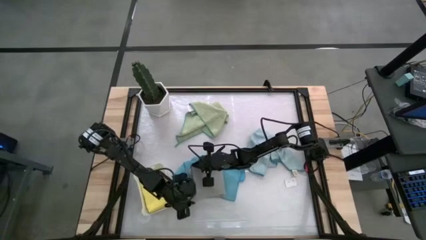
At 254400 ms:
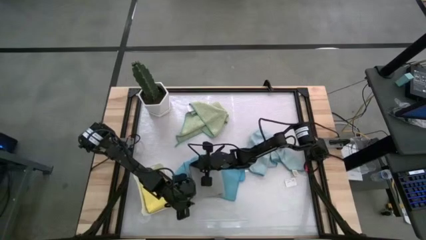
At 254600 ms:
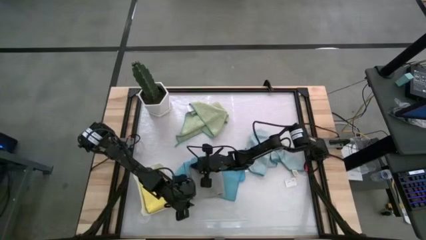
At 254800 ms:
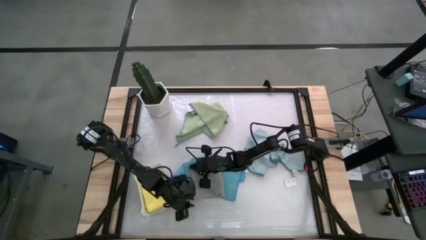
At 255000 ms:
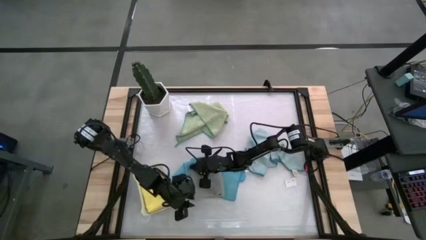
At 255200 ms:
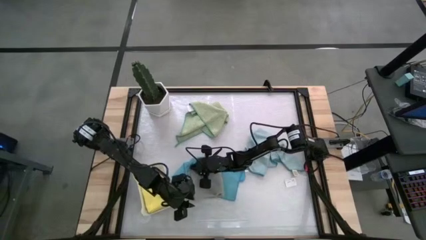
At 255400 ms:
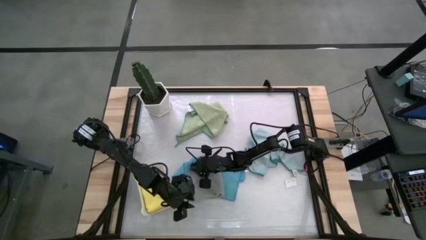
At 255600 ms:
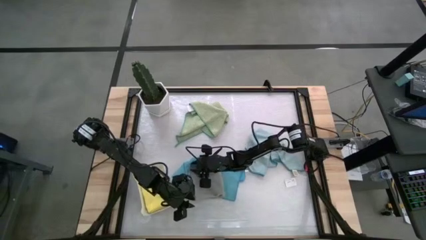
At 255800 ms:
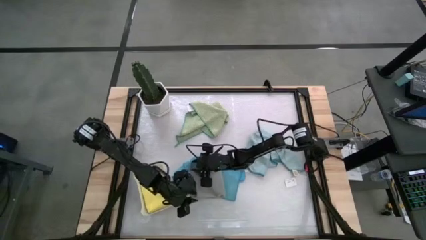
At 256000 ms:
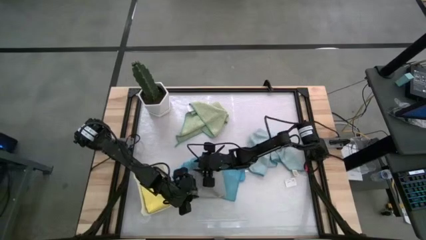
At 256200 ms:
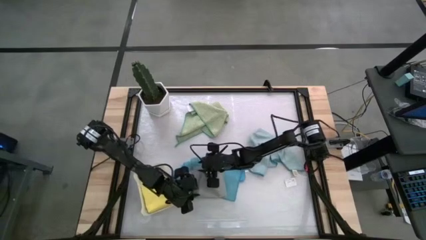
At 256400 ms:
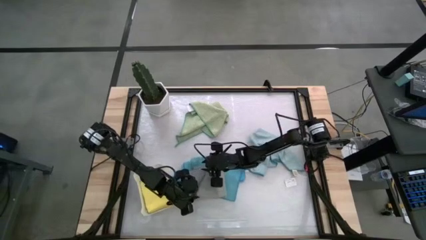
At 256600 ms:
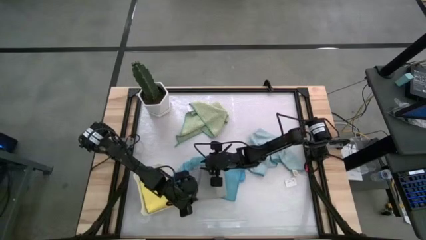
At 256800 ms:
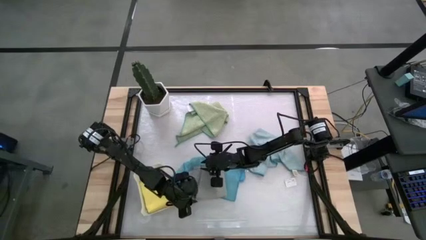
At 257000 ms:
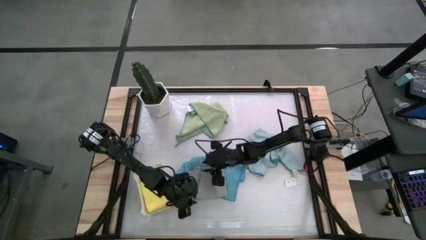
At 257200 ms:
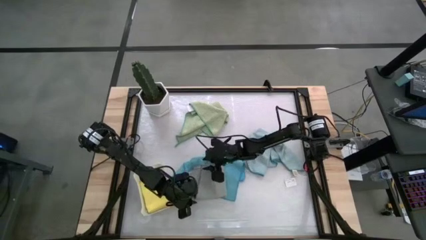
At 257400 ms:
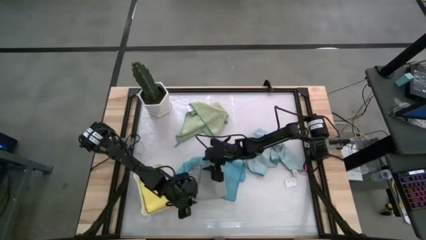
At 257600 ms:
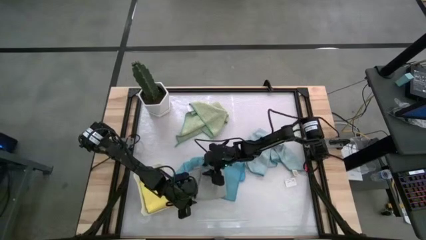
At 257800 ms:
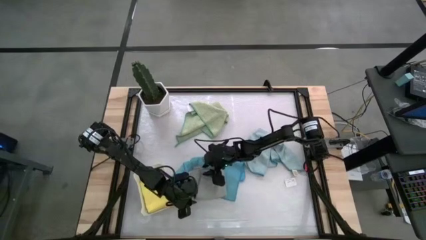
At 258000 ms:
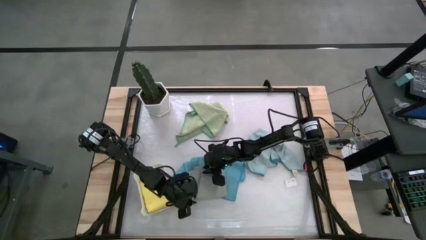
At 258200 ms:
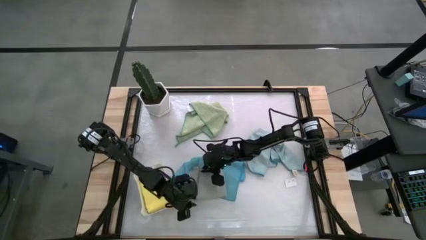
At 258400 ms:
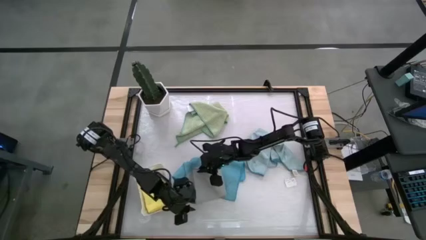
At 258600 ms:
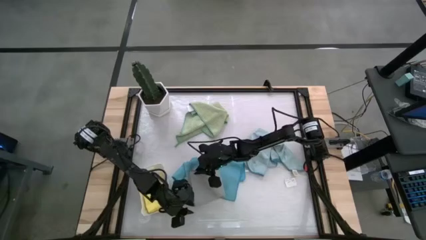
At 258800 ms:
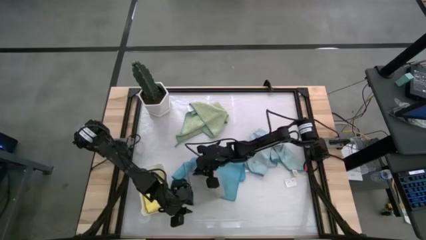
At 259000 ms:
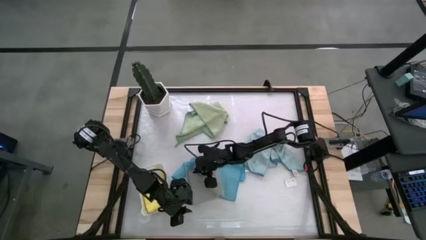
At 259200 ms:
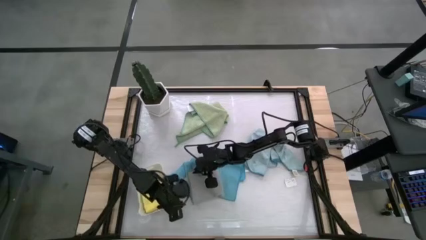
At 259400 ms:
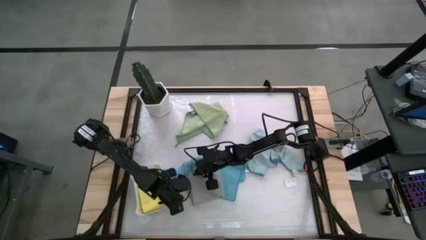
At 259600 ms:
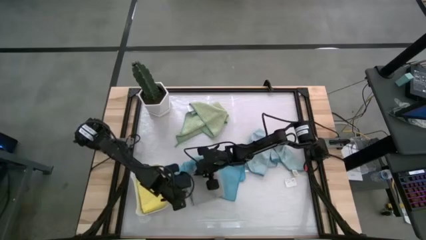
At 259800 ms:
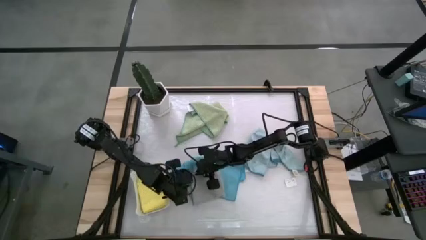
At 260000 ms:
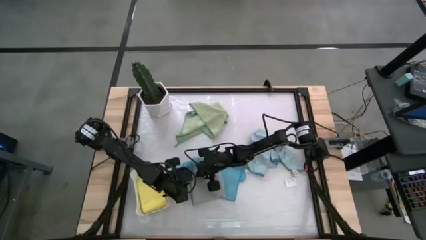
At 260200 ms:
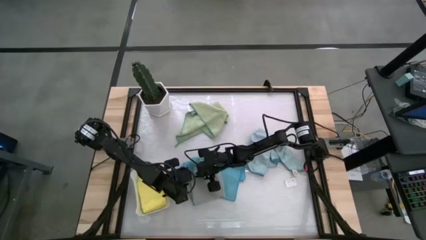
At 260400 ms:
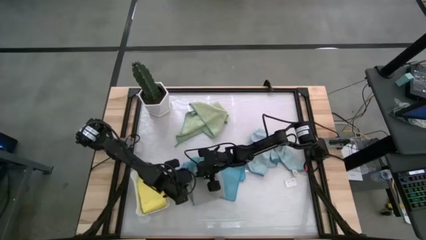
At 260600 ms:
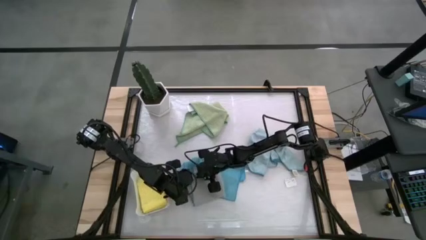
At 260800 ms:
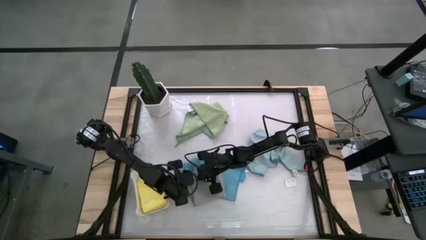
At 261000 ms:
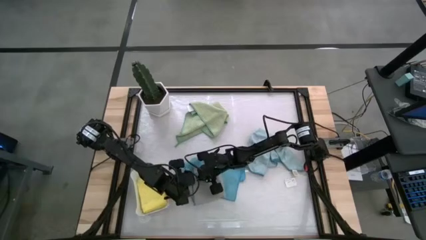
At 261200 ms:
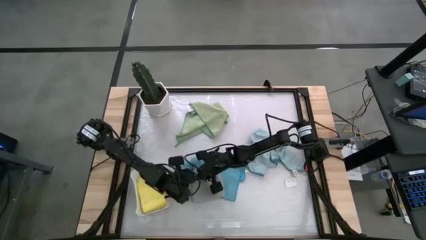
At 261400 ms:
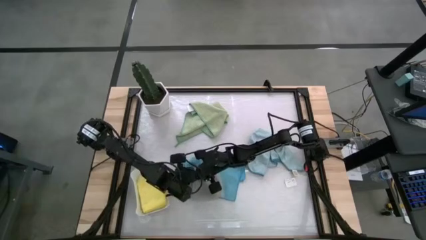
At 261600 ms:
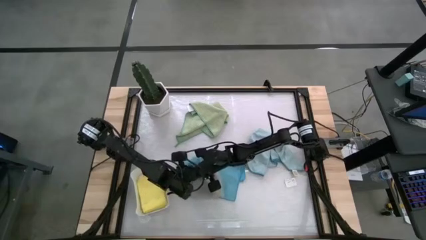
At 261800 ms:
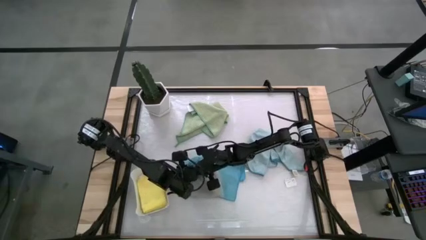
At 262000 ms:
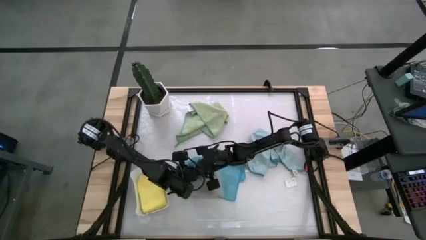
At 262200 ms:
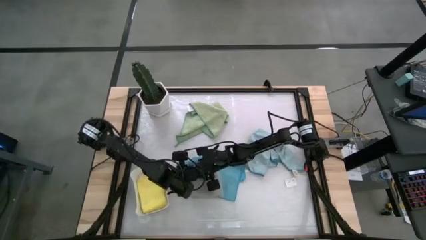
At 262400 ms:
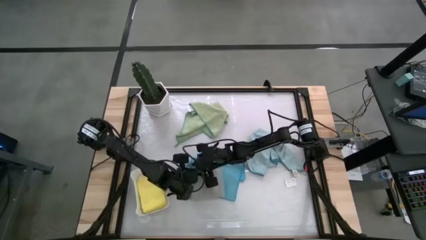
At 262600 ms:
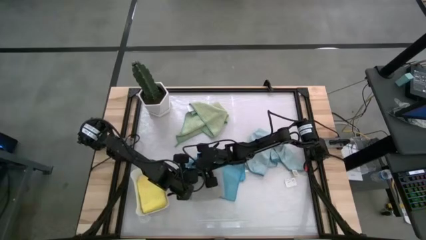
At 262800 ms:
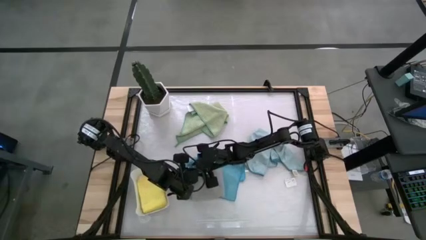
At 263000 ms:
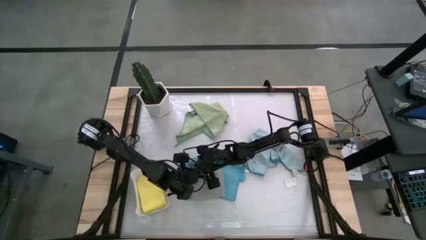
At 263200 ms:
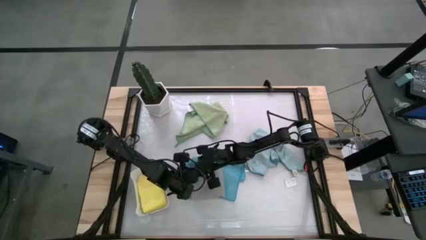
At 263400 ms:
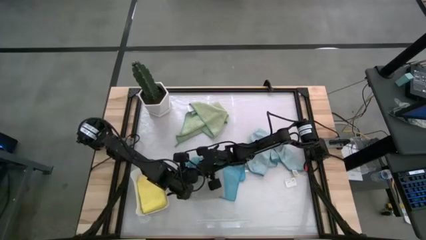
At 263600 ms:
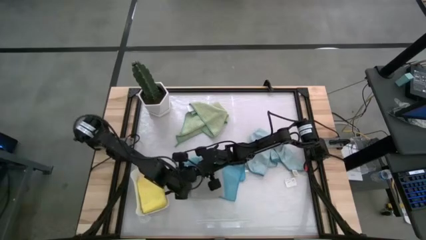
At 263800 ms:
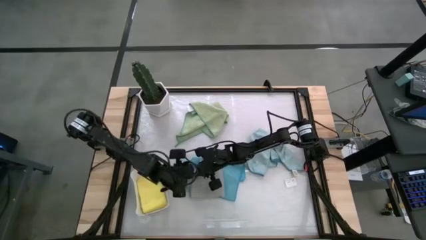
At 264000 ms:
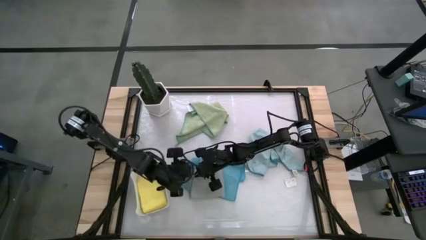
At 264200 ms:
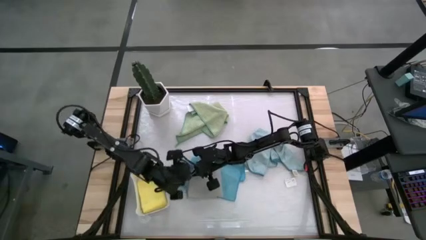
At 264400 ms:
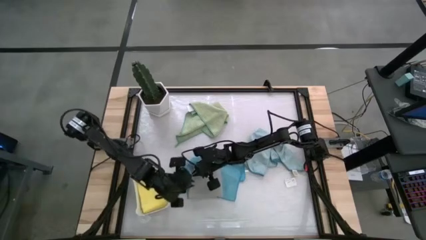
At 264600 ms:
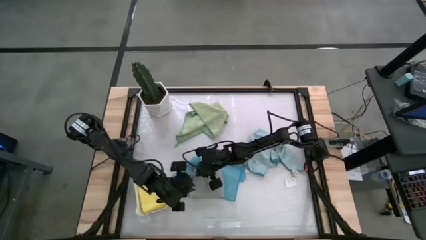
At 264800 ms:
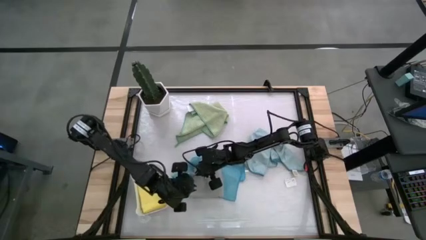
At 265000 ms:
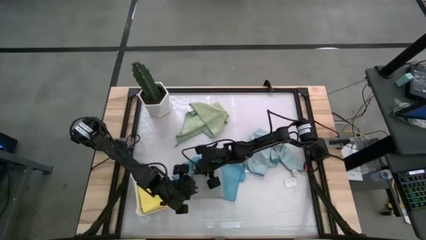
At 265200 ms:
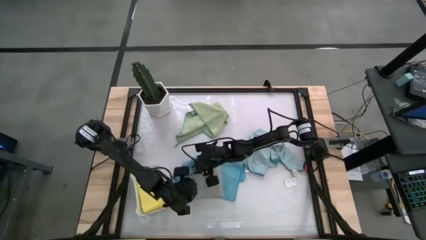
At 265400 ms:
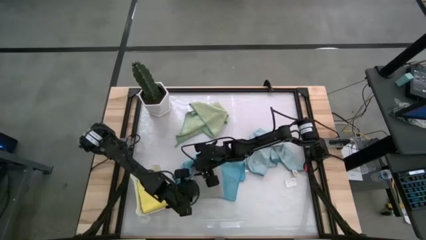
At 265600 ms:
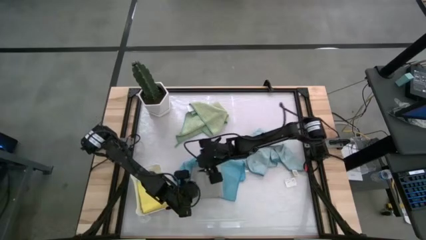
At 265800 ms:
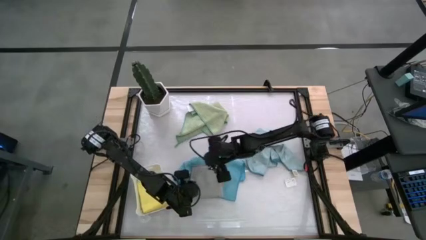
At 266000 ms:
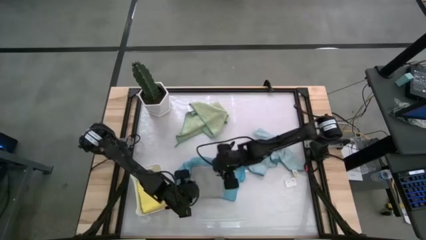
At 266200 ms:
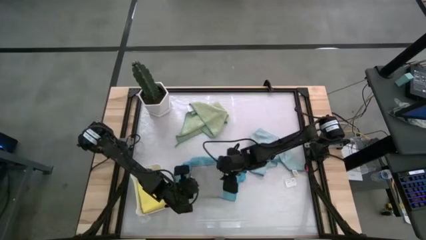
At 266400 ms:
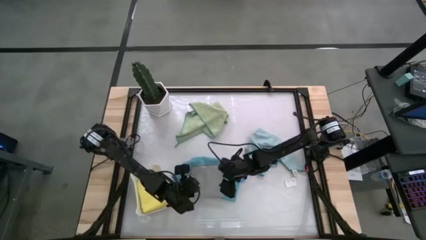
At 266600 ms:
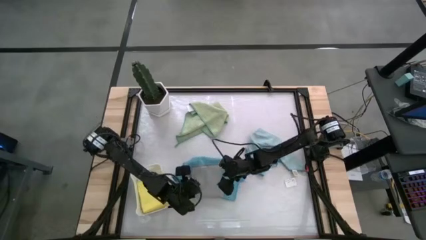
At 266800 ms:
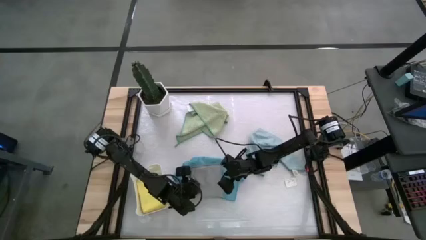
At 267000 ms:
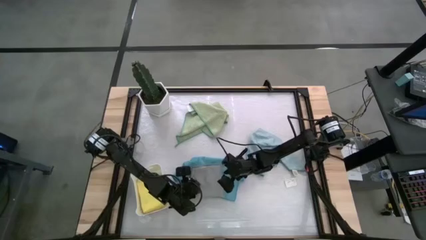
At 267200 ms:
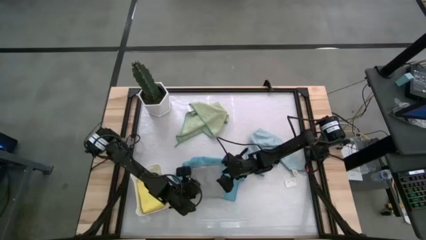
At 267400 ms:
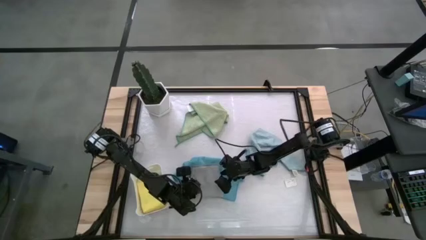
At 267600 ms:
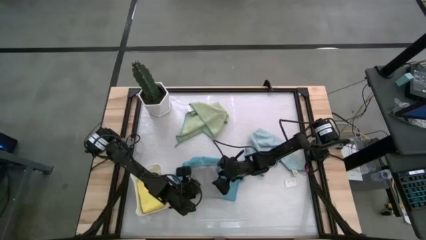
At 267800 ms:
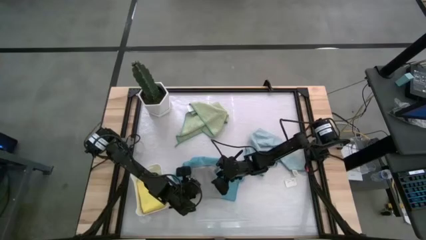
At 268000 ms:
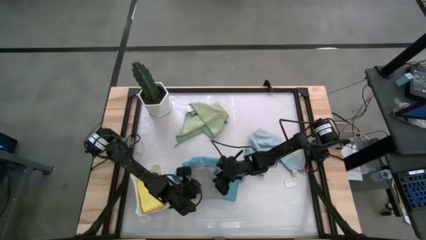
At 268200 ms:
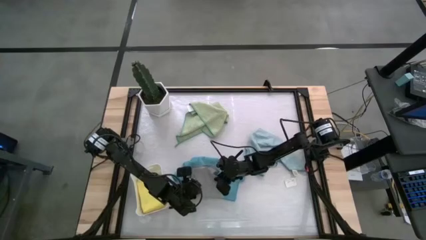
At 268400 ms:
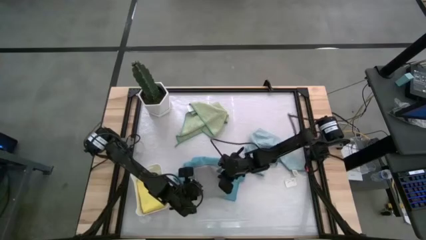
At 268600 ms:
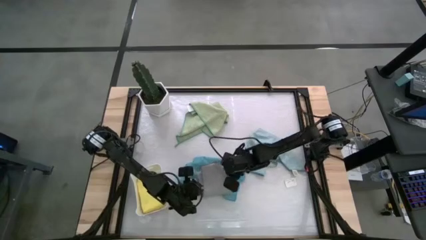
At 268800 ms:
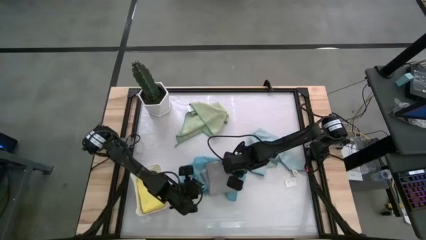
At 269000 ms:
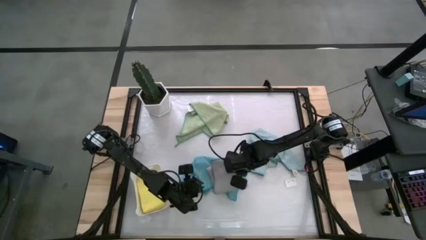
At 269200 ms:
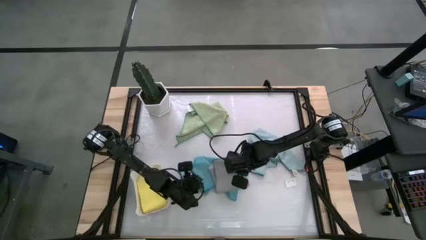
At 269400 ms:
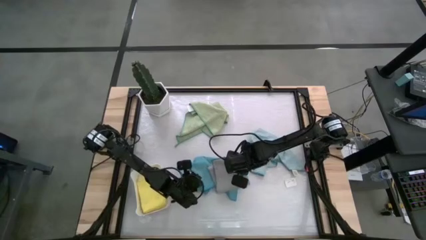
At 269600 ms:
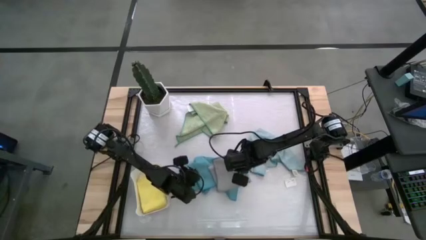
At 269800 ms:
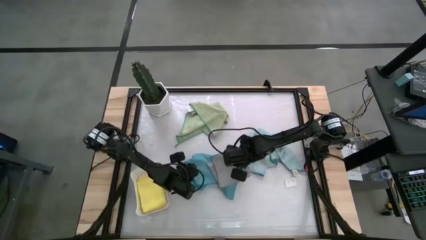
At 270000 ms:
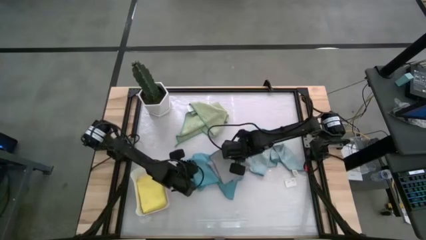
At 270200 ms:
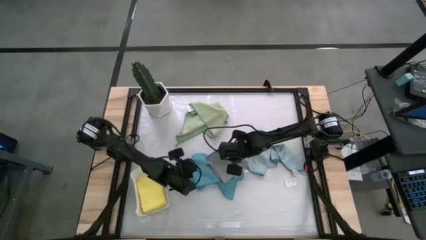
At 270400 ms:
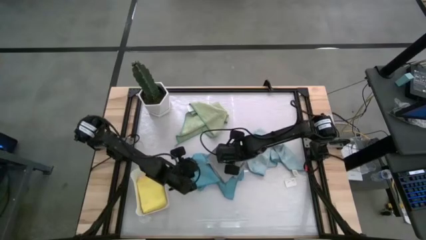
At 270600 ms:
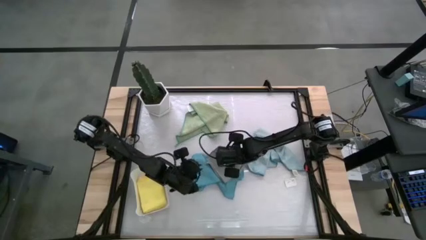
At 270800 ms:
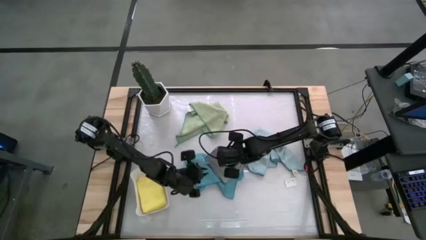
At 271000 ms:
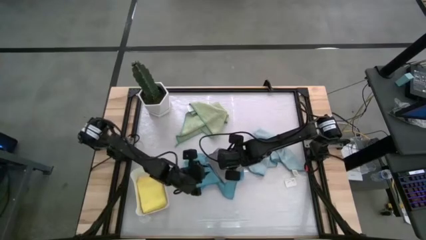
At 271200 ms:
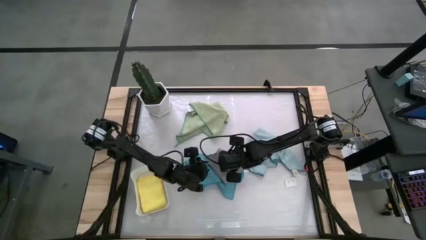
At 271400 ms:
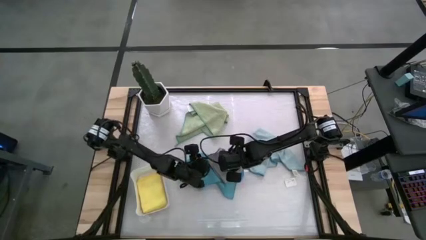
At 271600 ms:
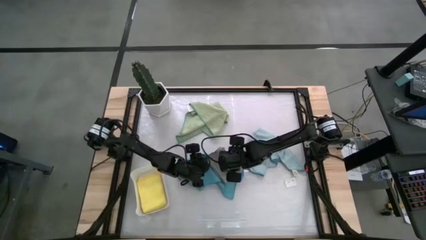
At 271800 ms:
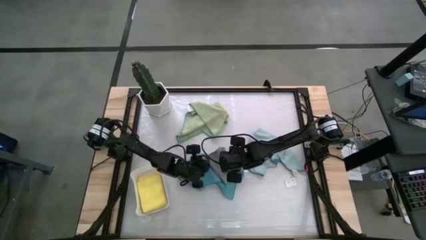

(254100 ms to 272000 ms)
Task: Fold microfiber towels
Fold the gray microfiber towel
